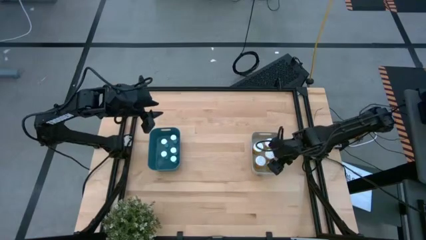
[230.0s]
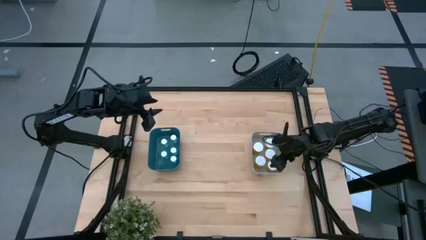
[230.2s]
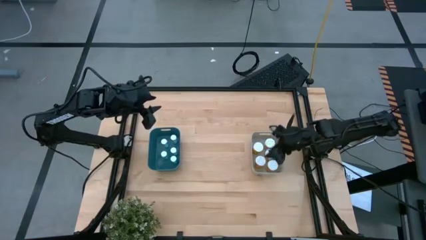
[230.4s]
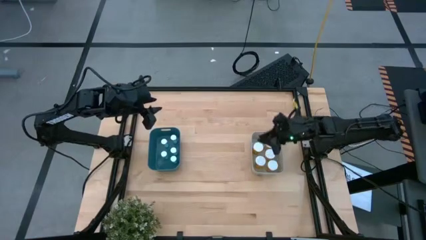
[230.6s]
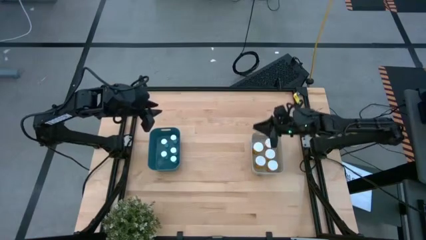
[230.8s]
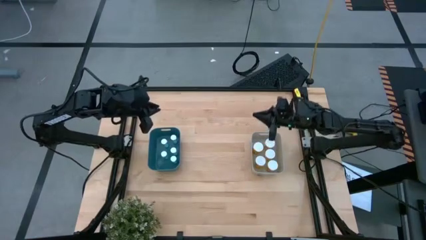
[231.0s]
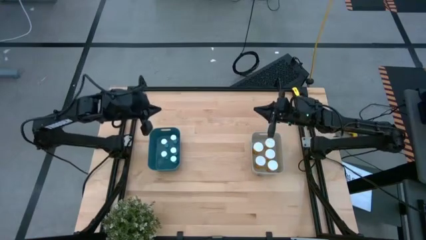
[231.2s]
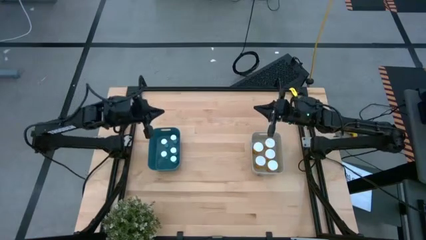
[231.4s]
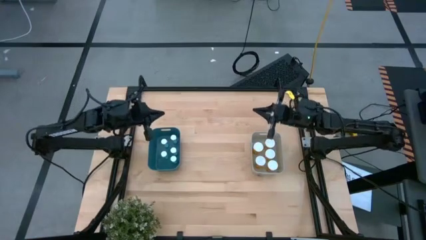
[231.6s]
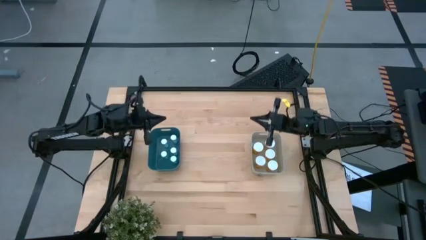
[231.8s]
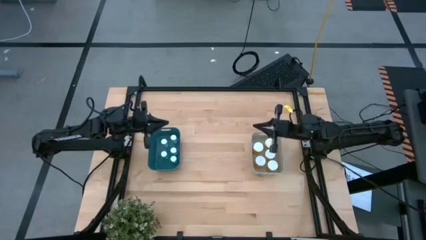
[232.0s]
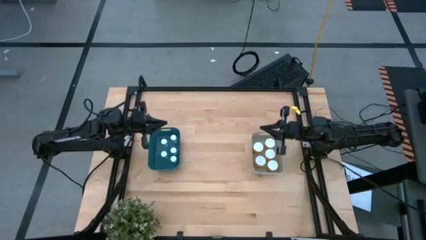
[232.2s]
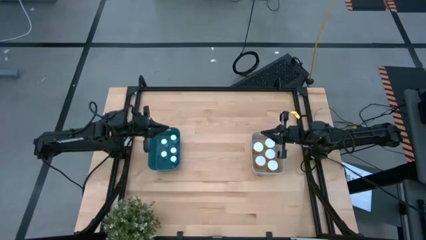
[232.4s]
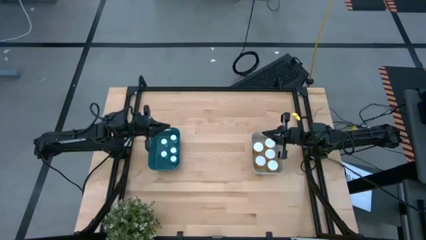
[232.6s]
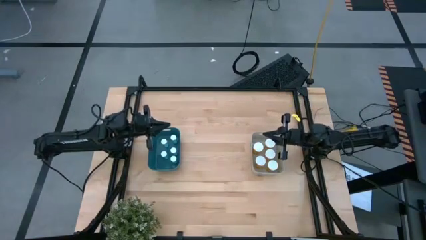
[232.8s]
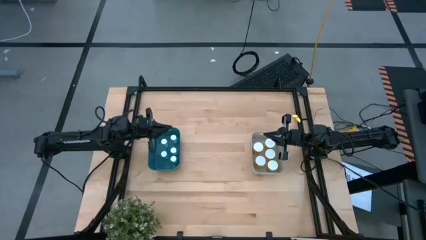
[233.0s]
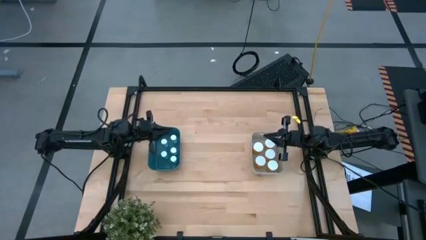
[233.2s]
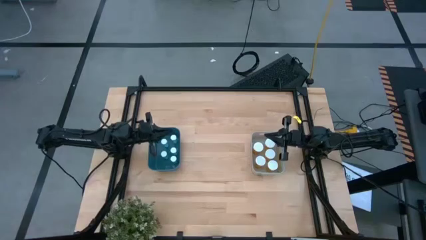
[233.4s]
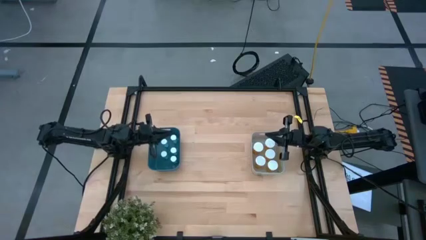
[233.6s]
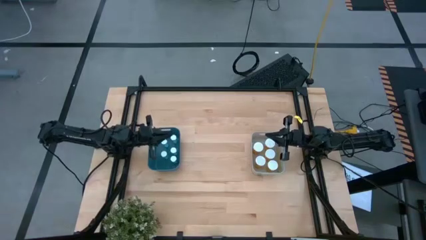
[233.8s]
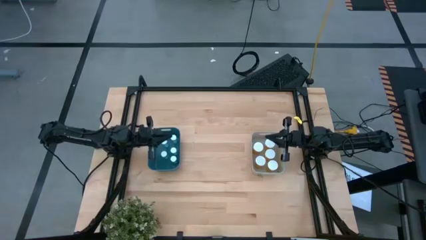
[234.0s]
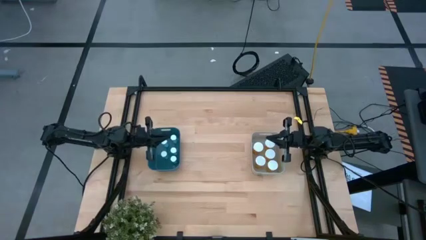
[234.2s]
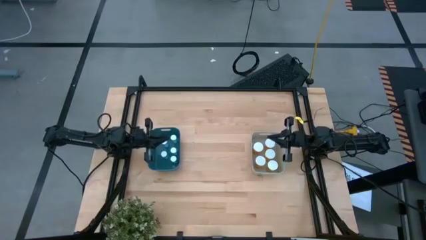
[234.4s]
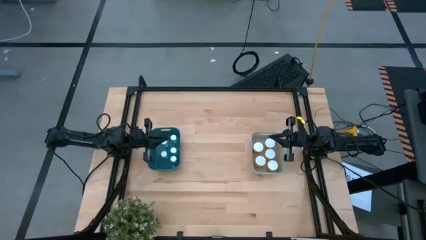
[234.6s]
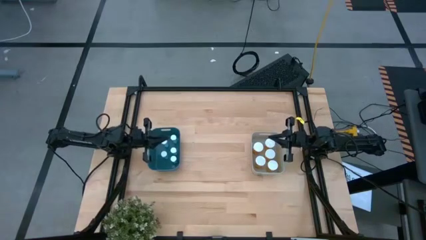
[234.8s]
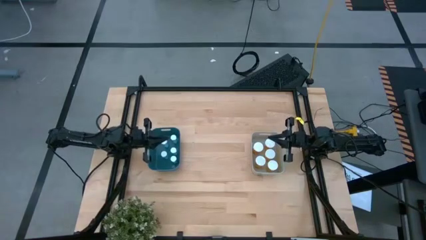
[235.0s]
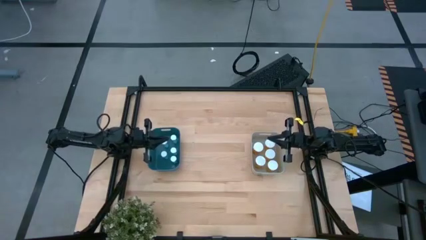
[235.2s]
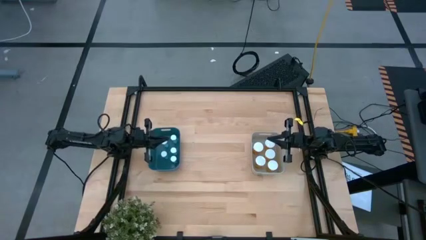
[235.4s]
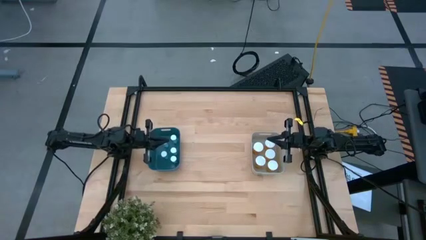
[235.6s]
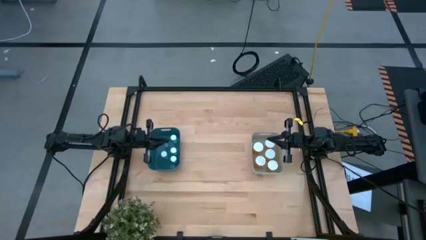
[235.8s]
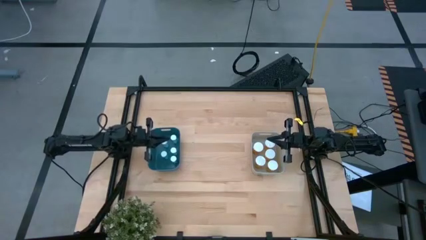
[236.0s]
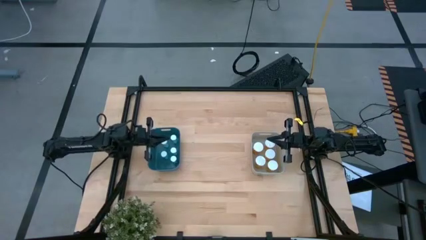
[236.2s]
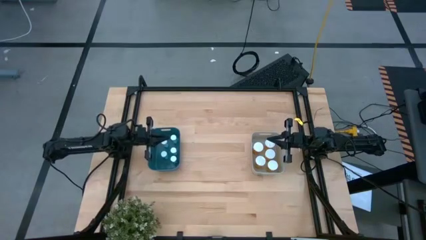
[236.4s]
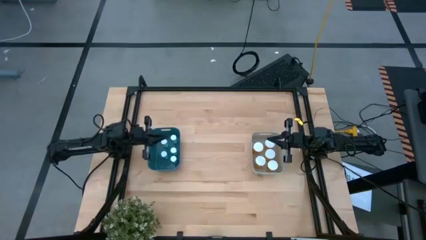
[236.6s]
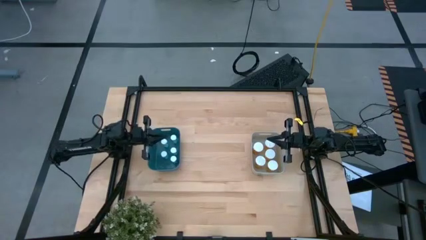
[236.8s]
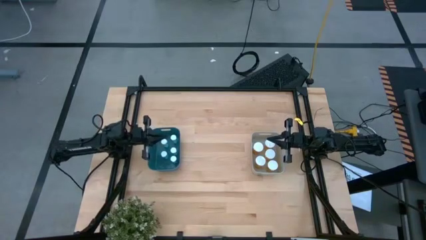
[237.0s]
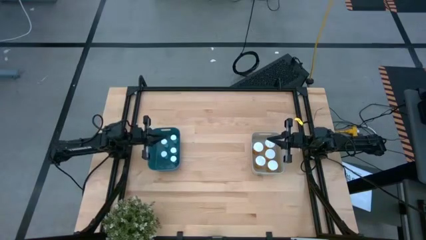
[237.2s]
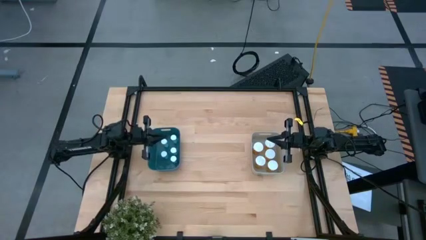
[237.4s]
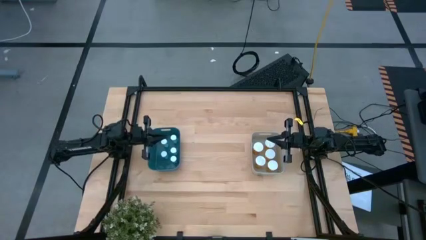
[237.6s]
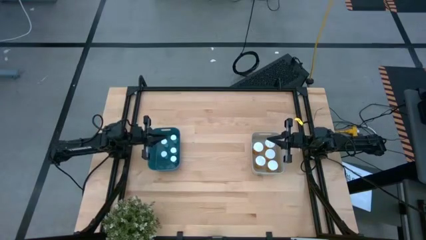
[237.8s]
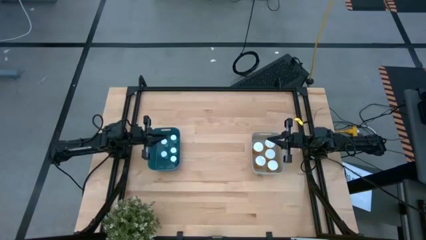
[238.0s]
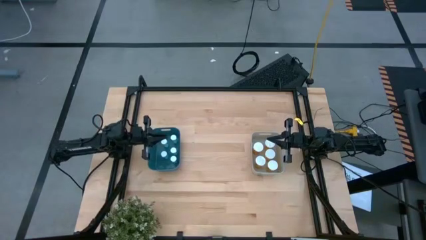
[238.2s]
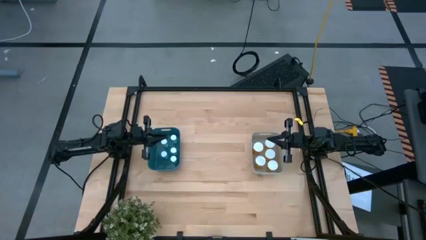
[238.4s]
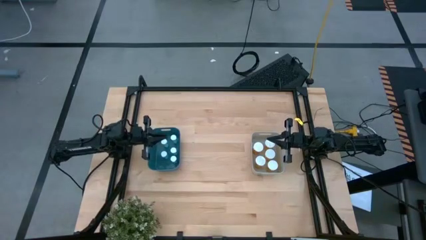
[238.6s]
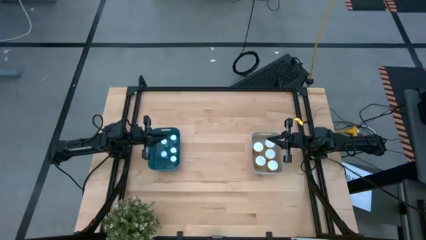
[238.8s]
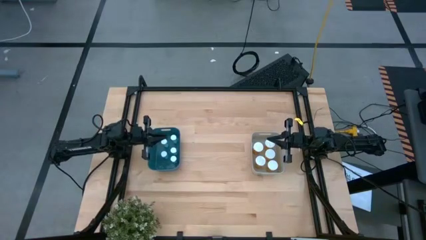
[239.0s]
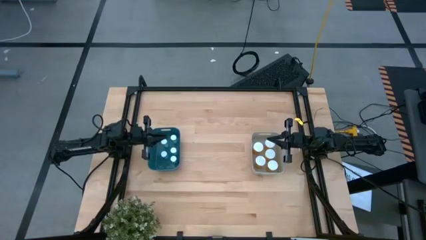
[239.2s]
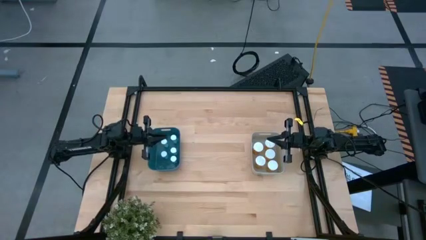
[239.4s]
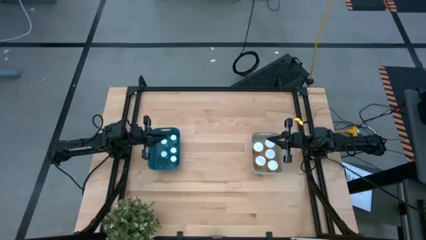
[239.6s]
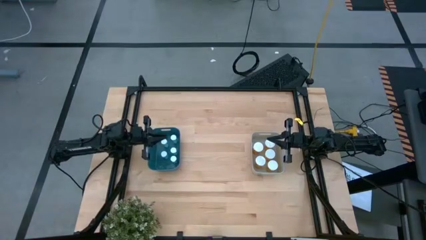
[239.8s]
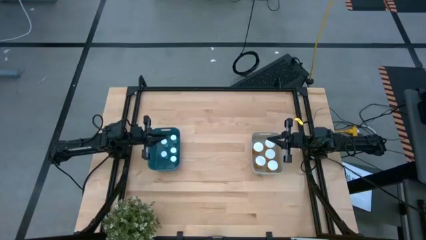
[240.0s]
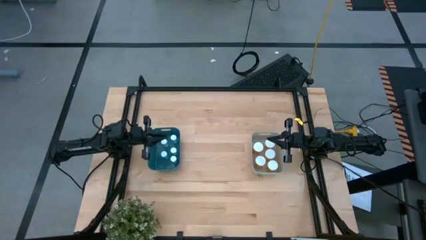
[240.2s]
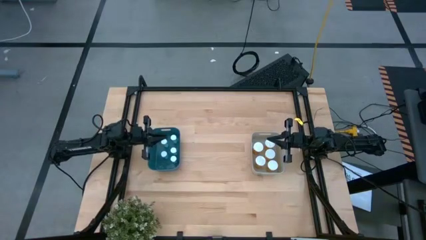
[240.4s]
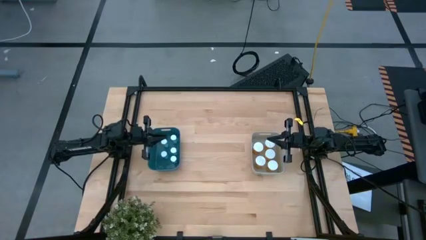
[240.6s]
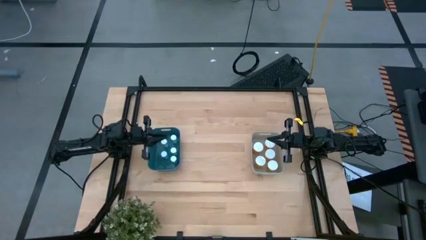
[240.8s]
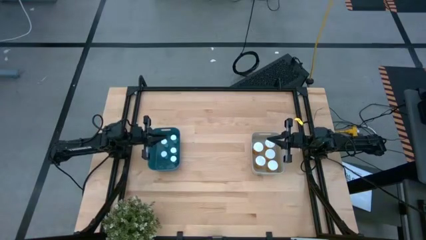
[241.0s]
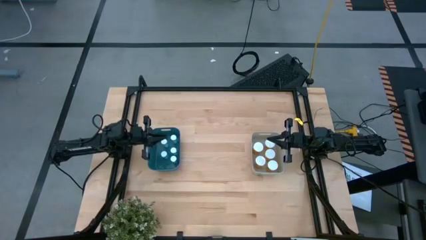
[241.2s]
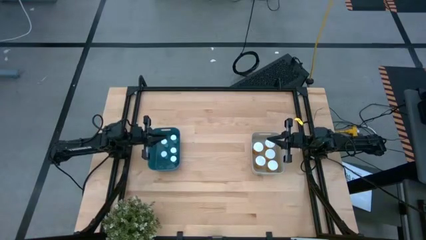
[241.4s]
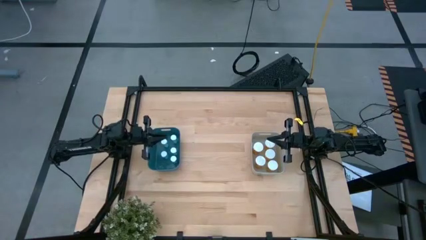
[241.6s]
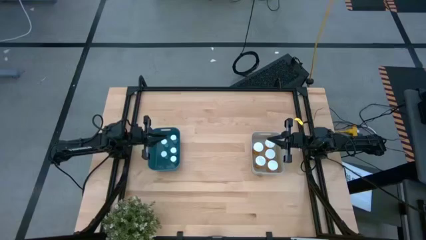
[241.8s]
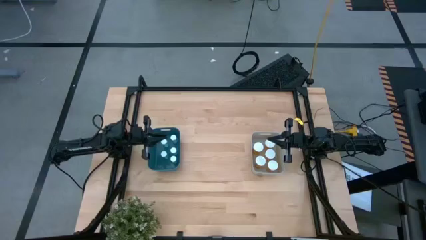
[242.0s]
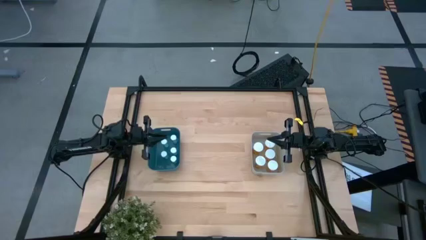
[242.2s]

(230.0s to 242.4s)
Task: Pick and place medicine bottles into bin by pill shape (circle, oval)
Return to Home Position

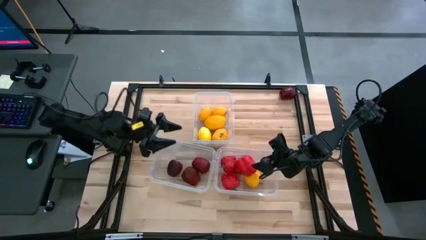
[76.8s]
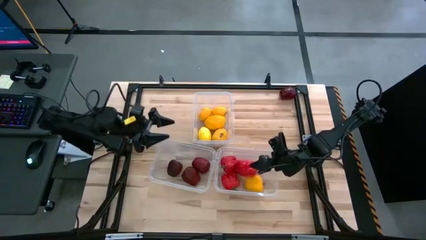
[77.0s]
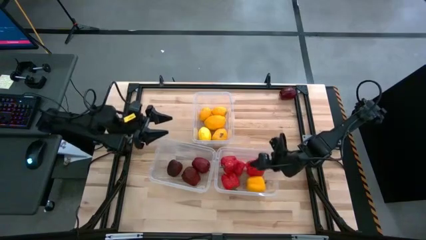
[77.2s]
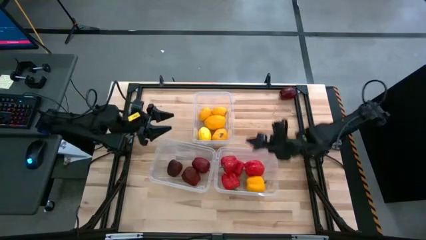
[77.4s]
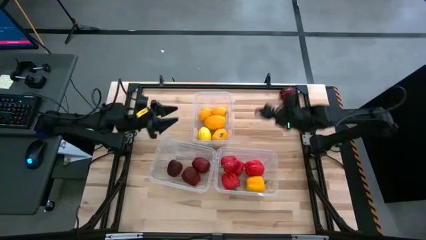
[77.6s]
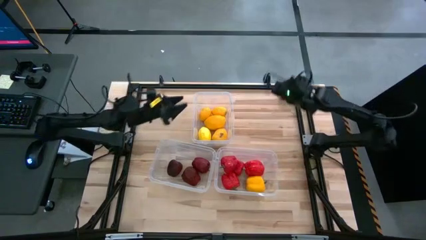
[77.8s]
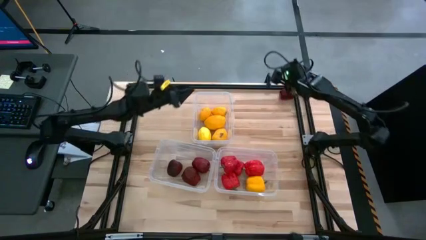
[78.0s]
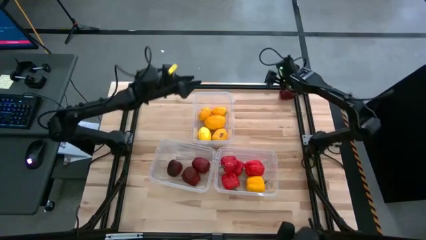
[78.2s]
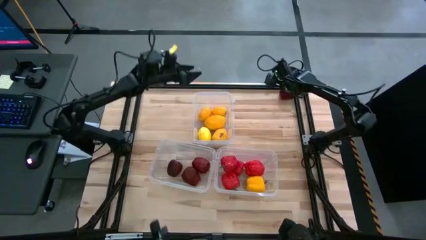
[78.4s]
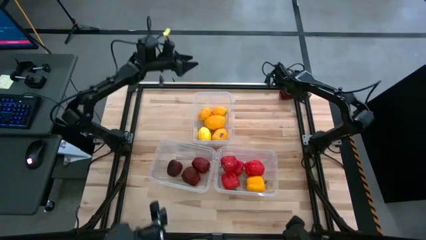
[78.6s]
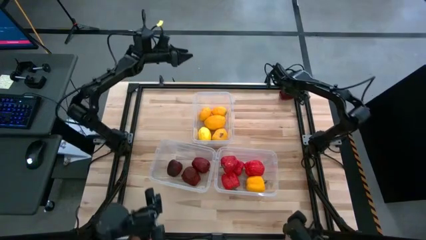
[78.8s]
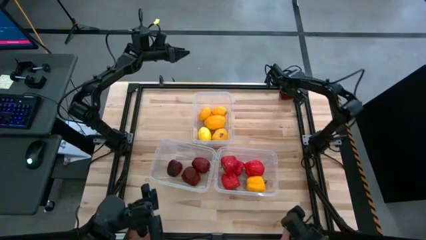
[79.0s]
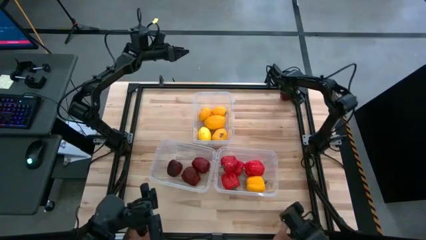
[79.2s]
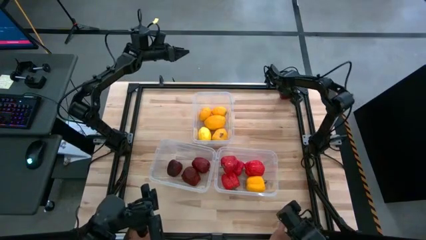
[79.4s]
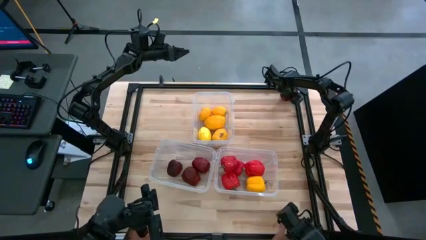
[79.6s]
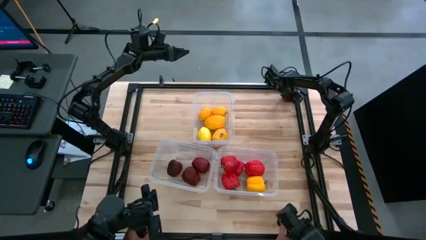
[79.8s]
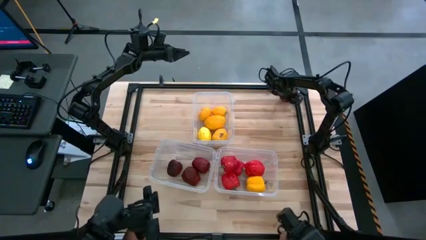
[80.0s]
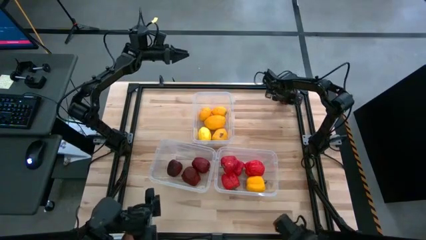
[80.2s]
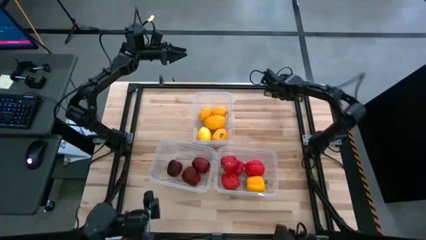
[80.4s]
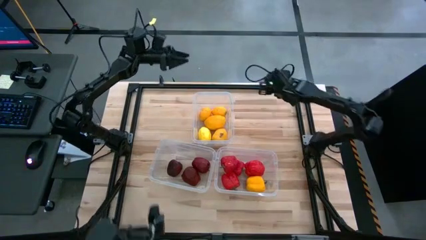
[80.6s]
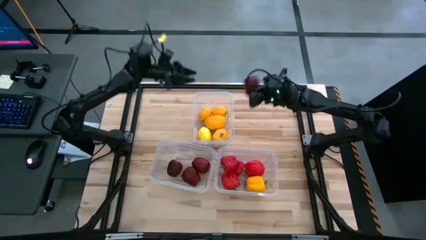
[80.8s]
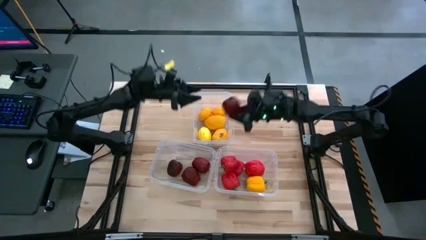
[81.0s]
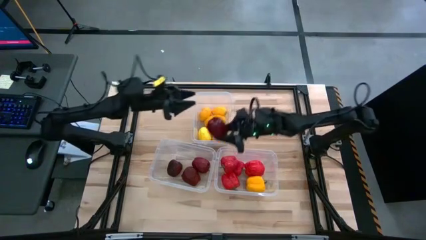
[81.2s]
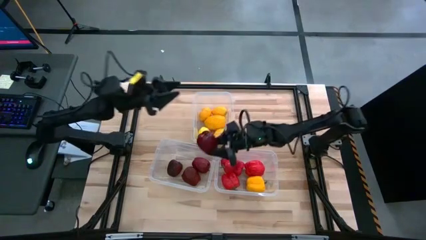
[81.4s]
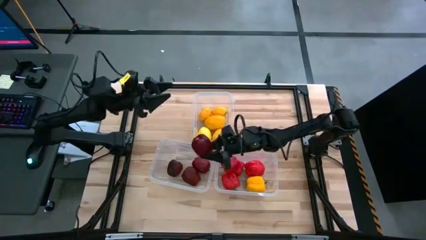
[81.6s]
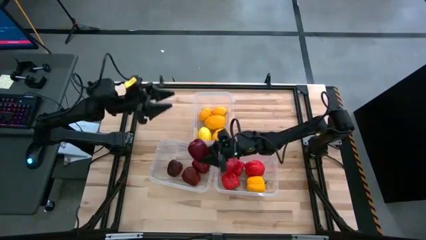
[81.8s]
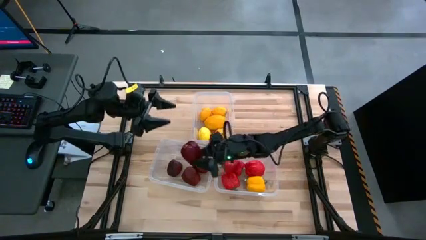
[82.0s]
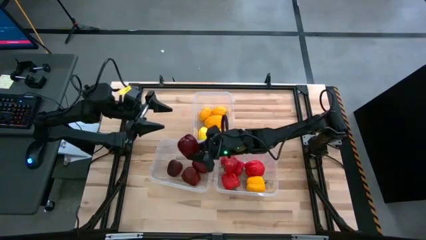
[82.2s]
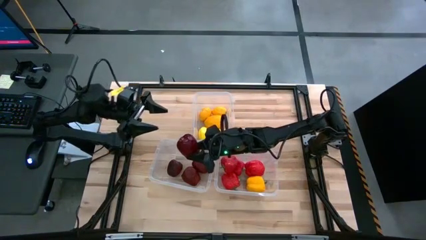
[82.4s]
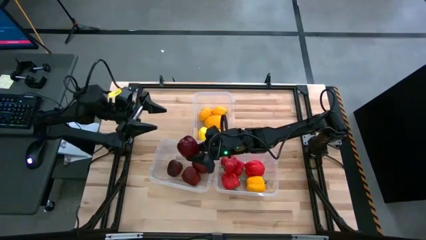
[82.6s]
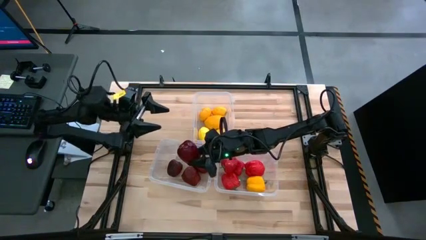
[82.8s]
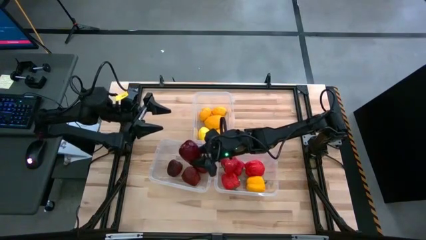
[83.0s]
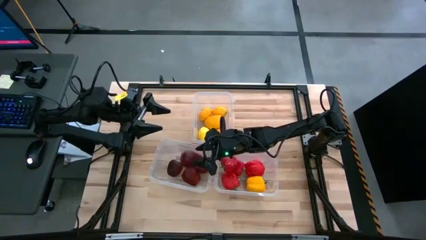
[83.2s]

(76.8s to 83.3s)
Task: Sort produce into baskets
Put the red apple into the bottom left transparent bin
